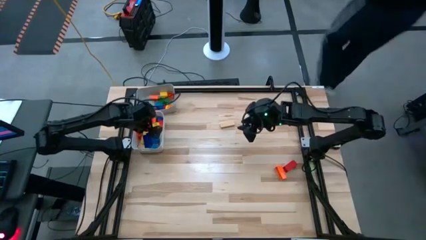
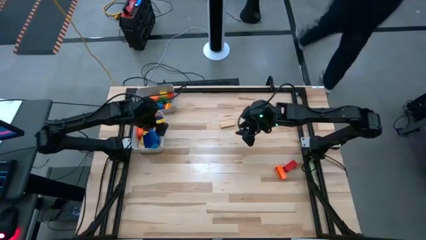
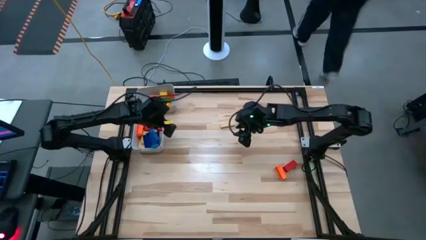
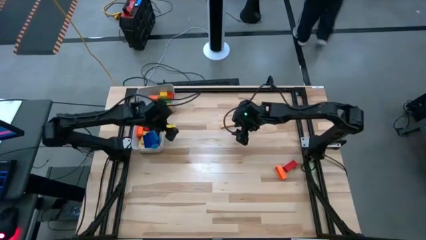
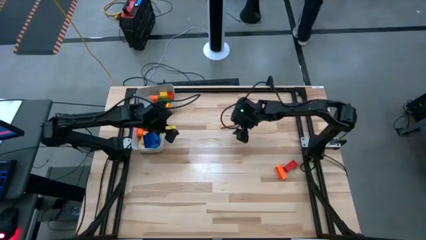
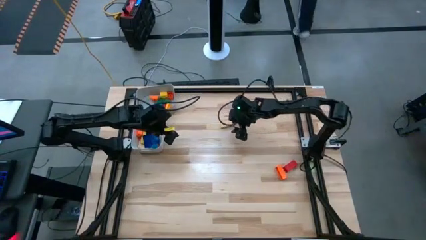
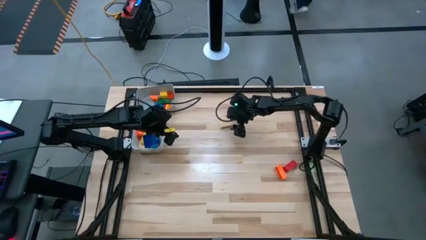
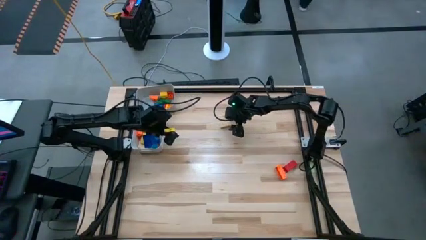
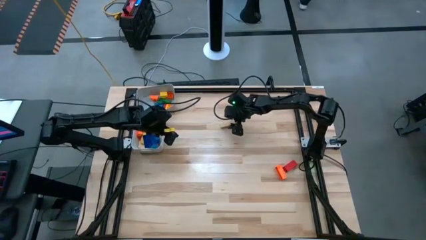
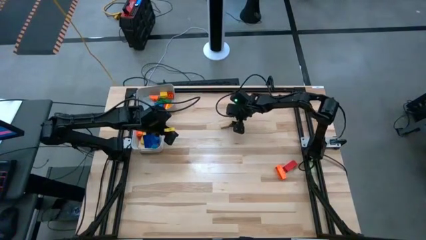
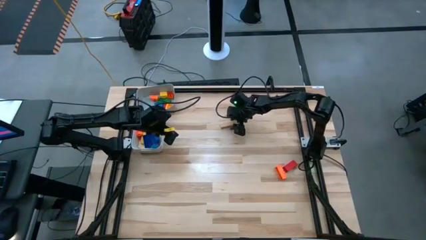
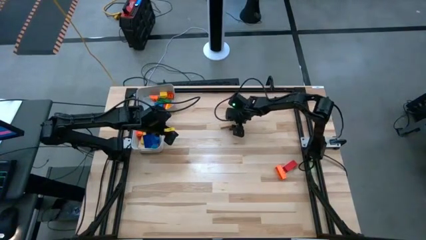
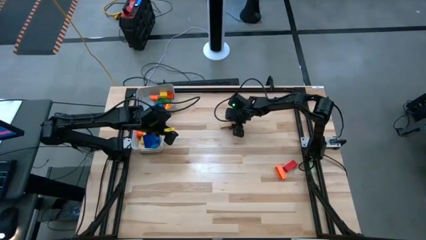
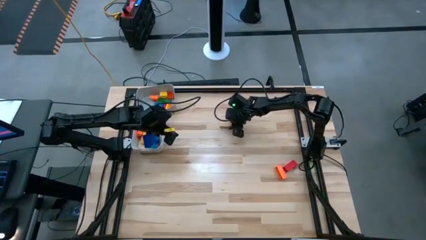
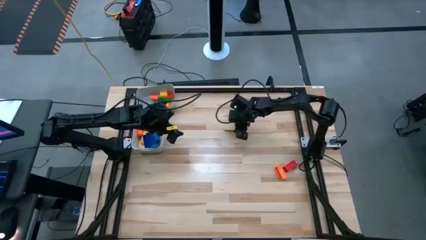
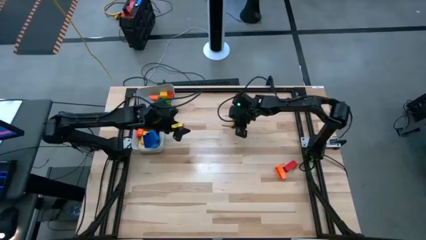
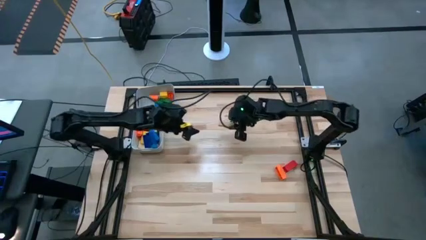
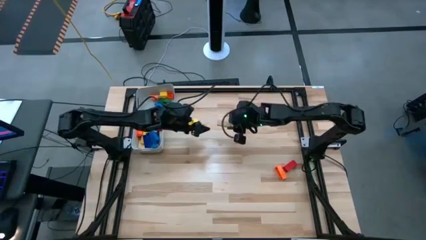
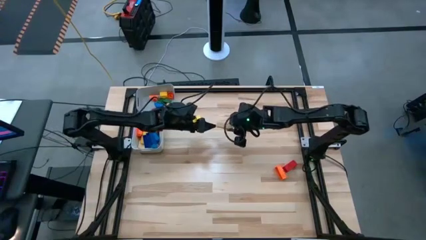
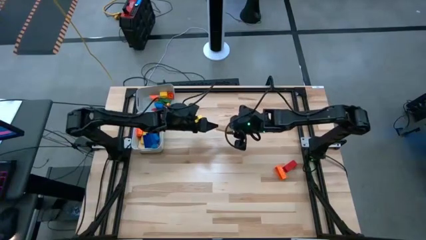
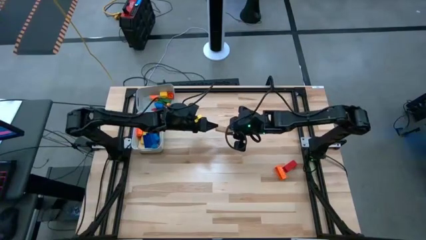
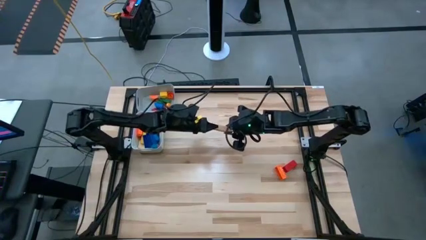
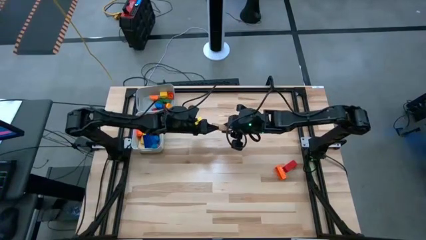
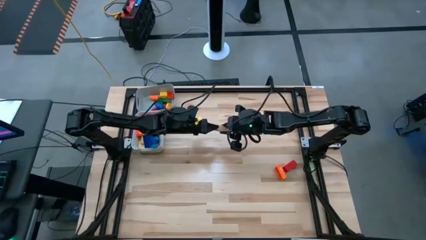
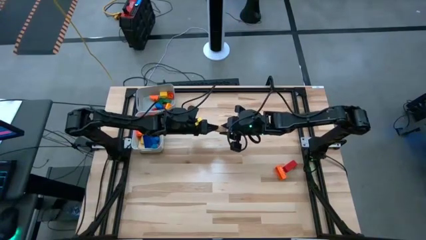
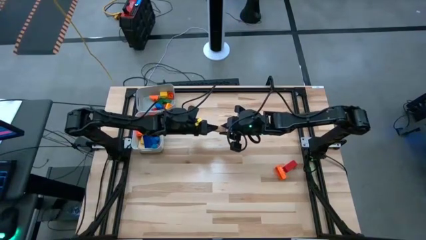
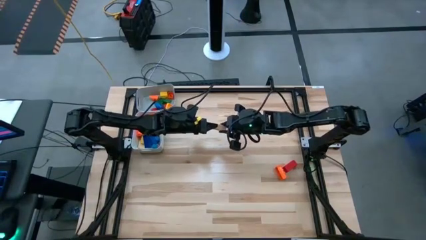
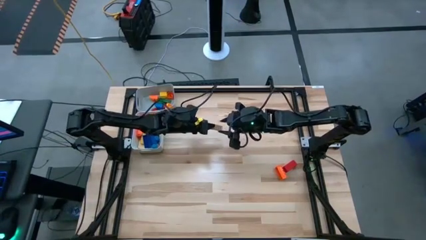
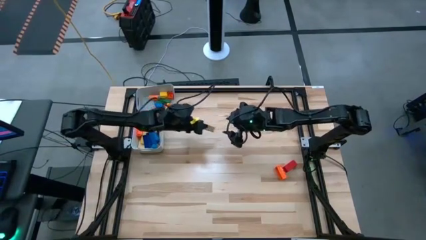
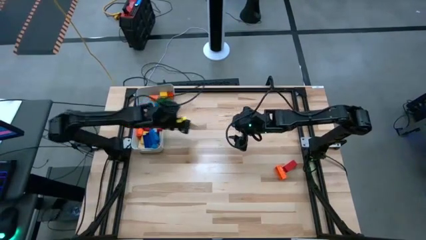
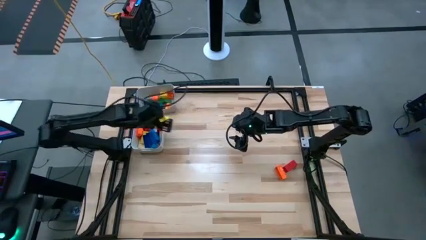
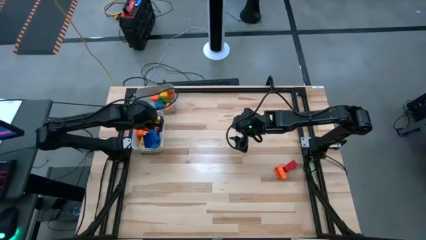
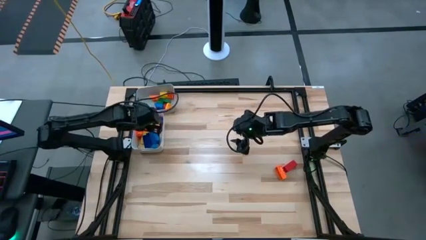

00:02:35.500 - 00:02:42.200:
Task: Sort blocks by size
Put the large brown wooden block into the white bin

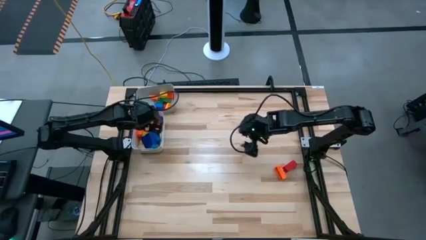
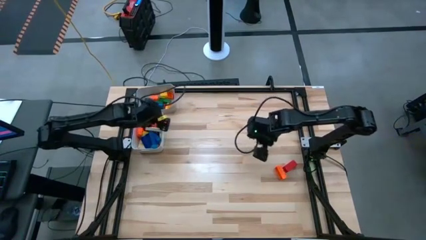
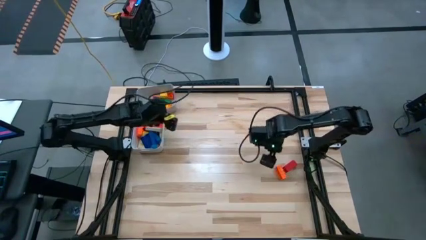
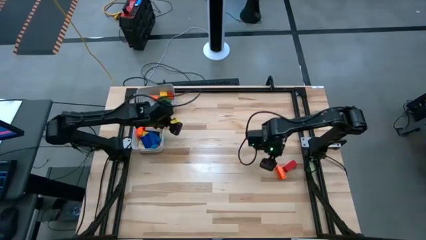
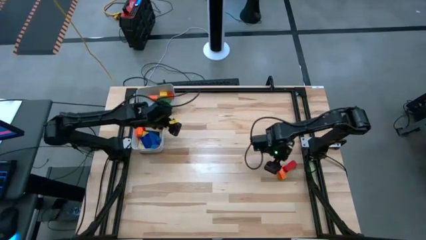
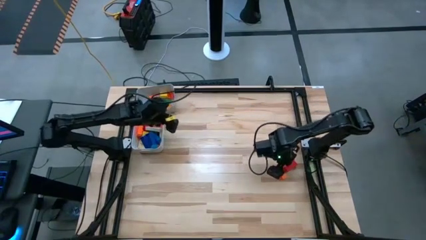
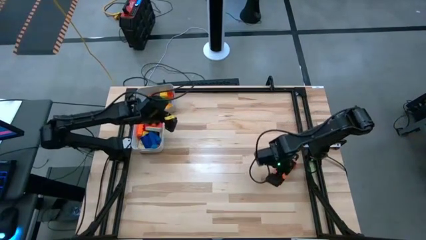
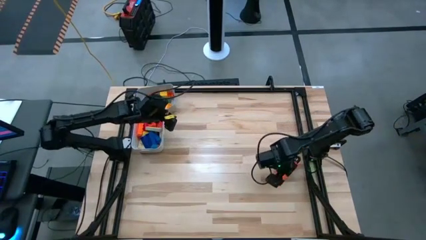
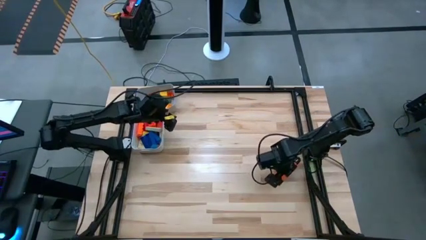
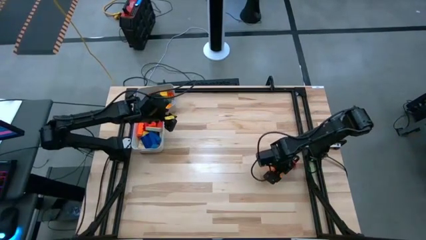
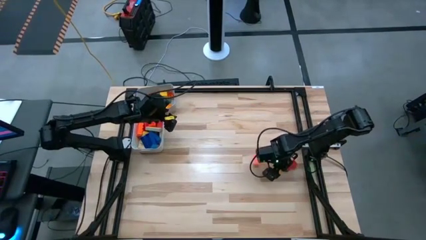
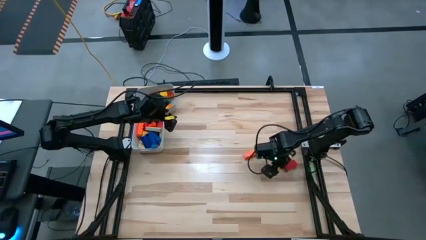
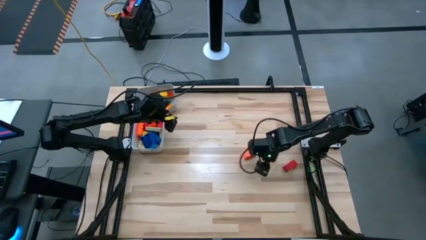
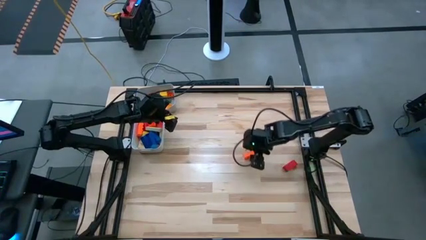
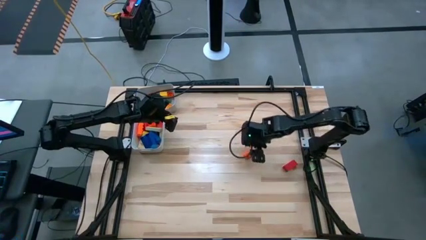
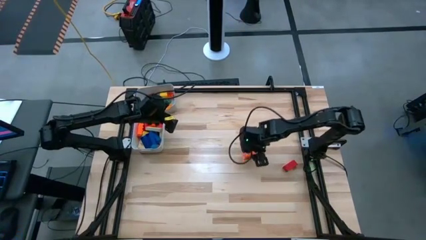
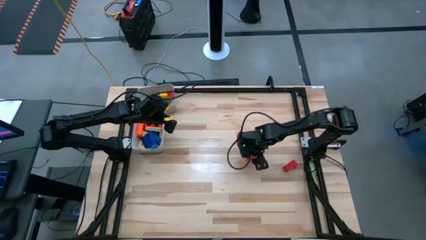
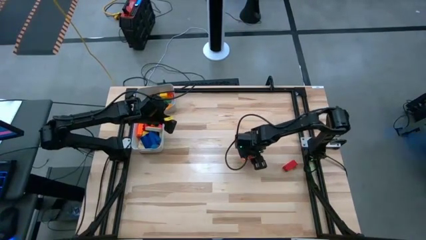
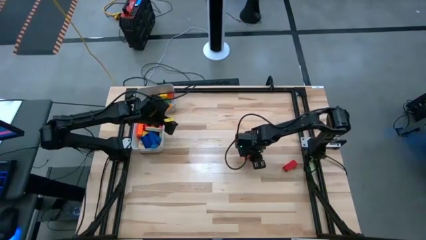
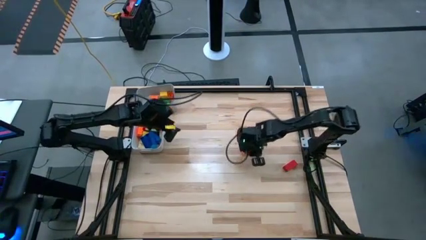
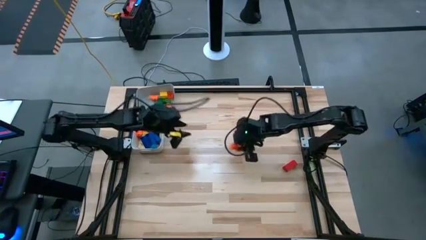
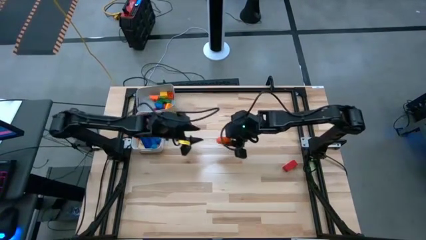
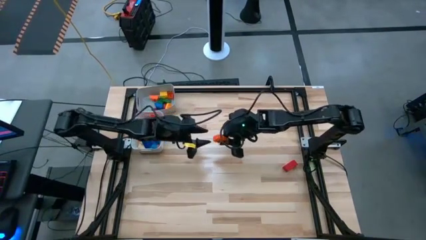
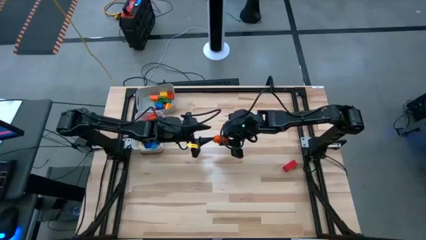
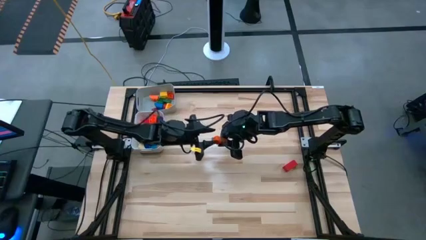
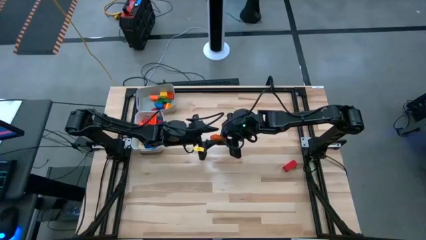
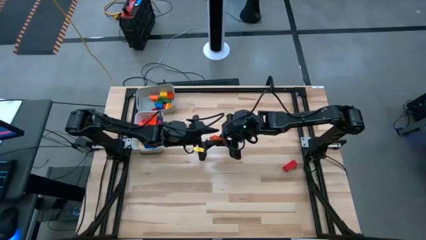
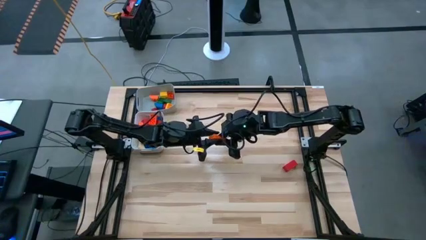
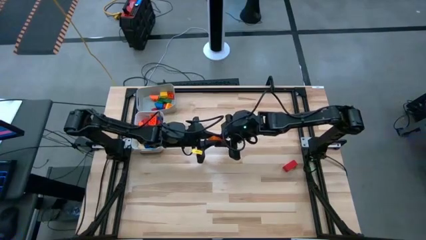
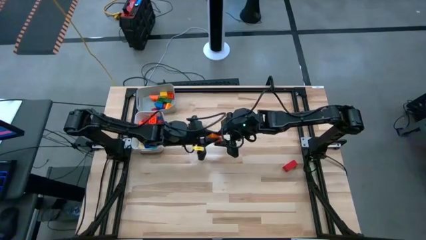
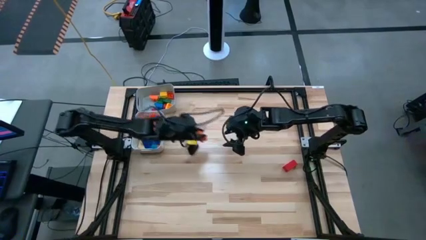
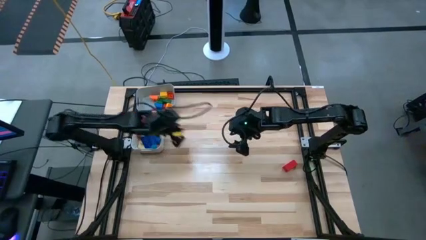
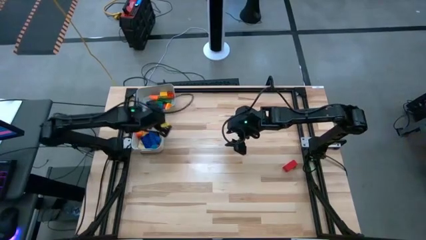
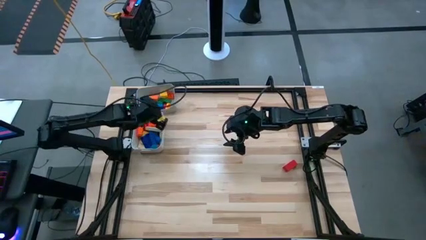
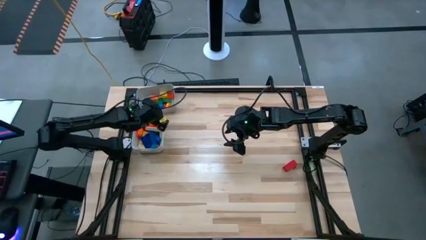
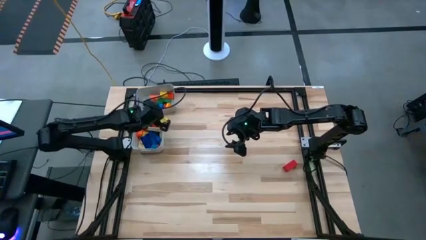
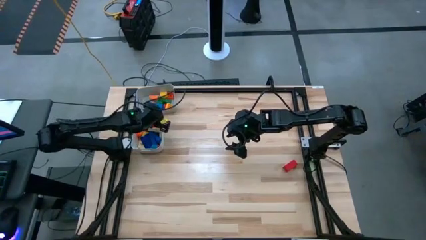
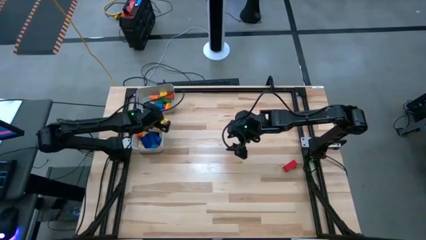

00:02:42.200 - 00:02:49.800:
Put the large orange game piece into the white bin
